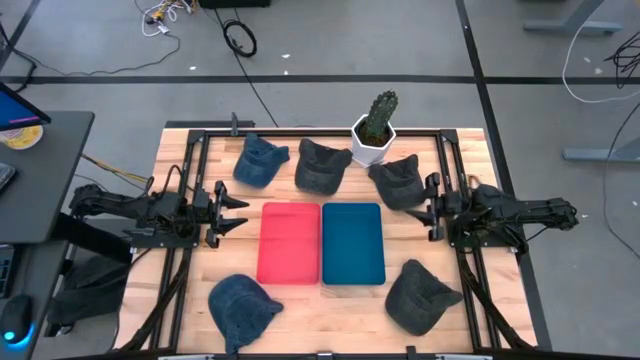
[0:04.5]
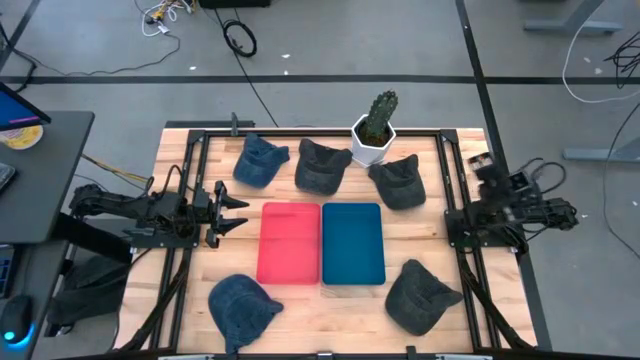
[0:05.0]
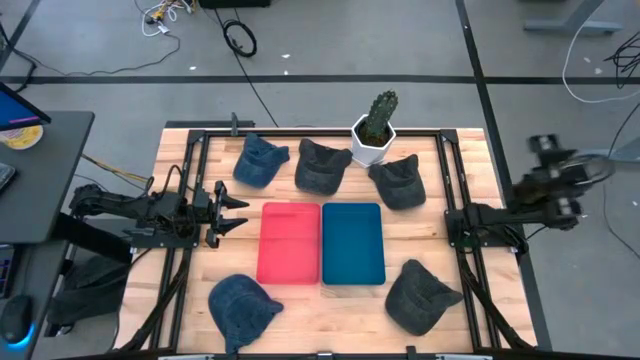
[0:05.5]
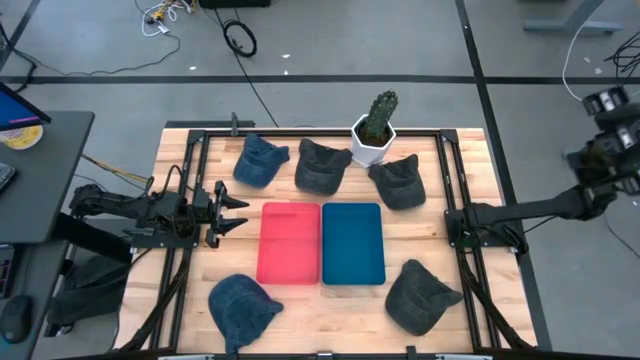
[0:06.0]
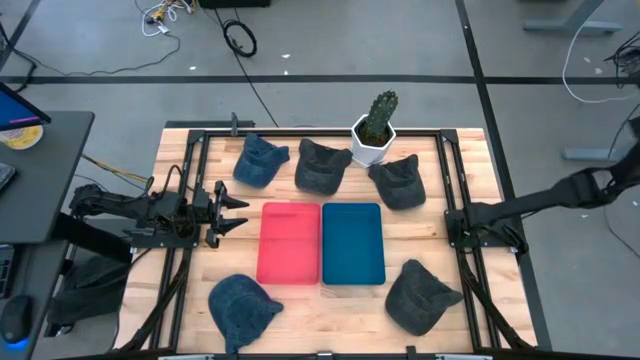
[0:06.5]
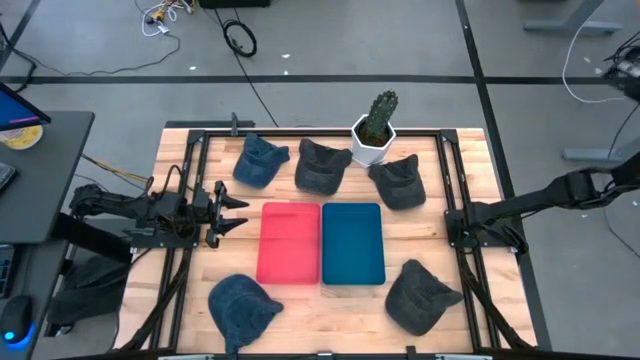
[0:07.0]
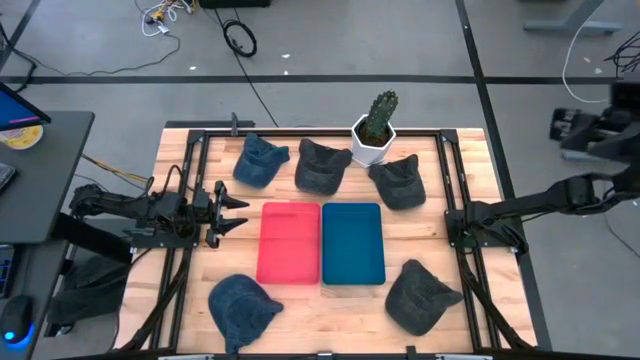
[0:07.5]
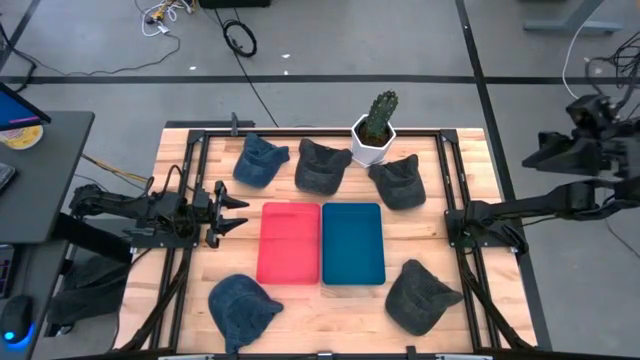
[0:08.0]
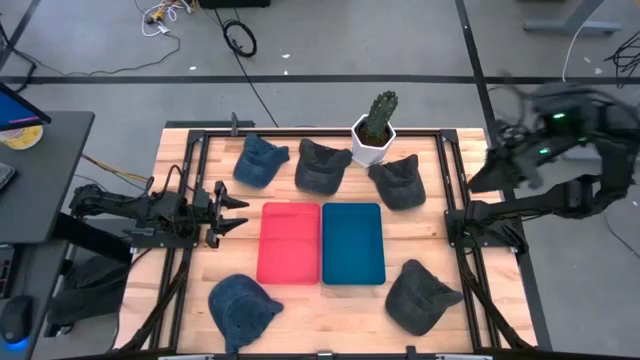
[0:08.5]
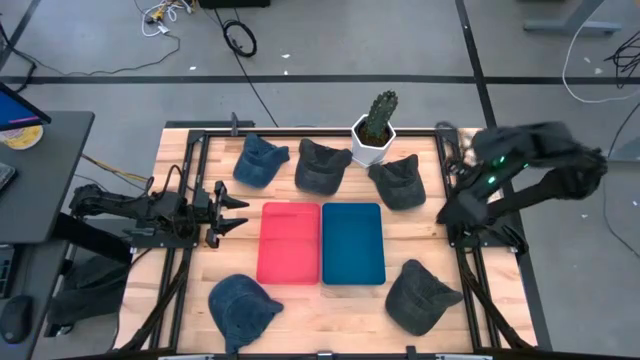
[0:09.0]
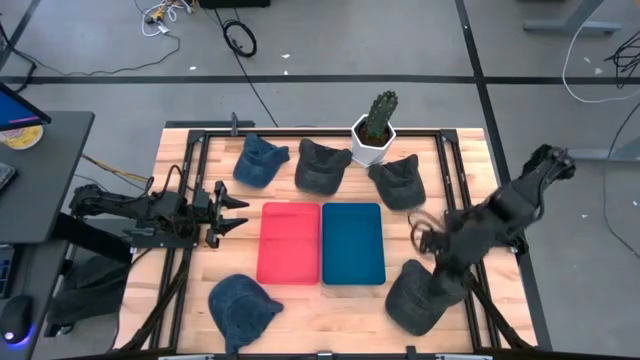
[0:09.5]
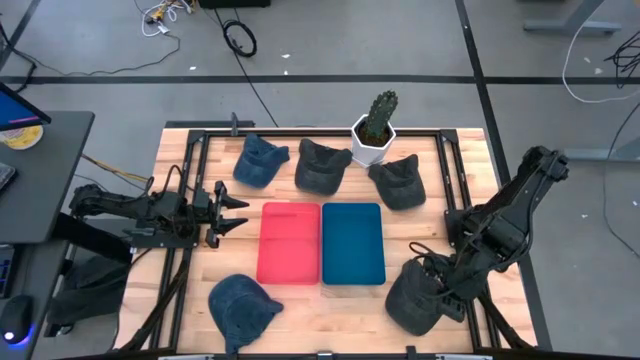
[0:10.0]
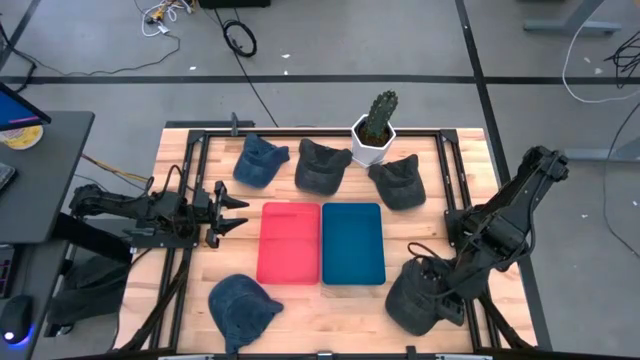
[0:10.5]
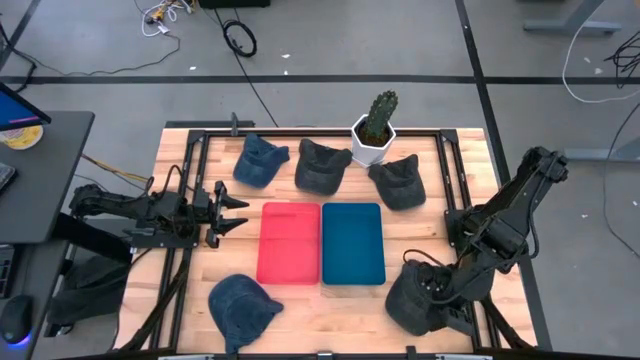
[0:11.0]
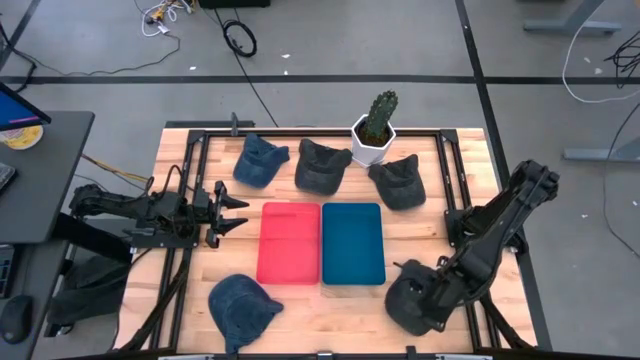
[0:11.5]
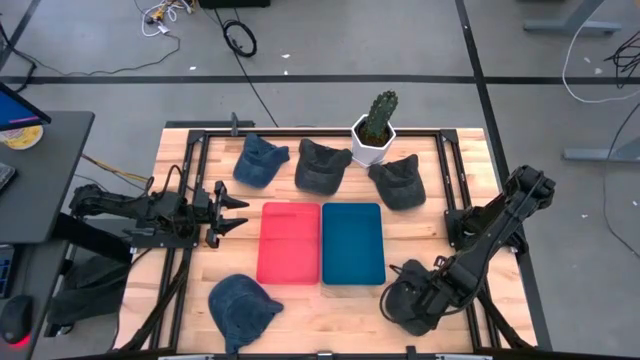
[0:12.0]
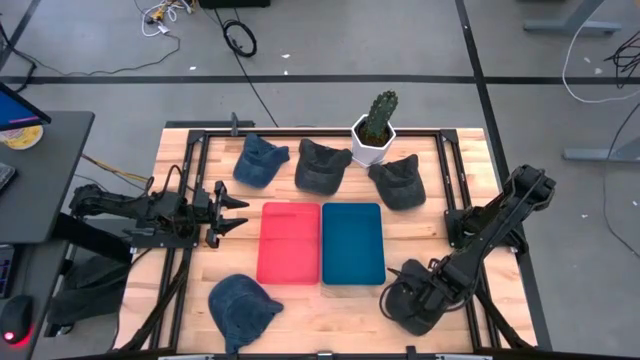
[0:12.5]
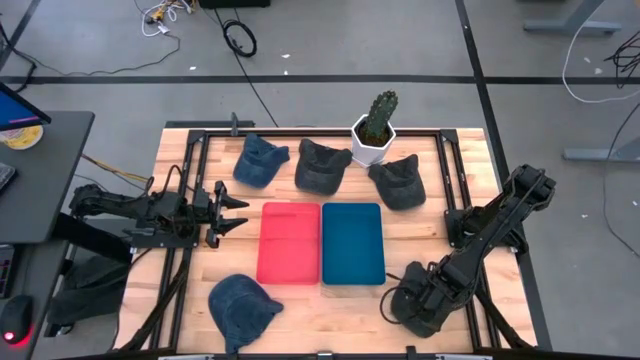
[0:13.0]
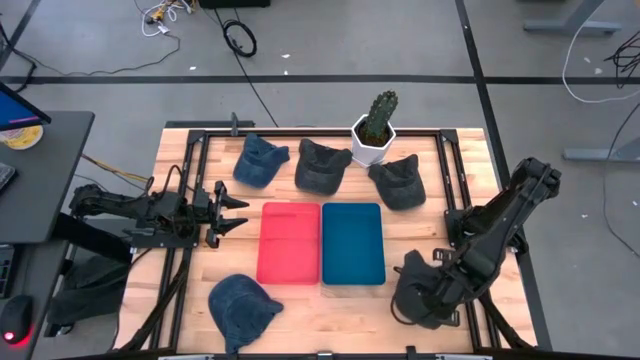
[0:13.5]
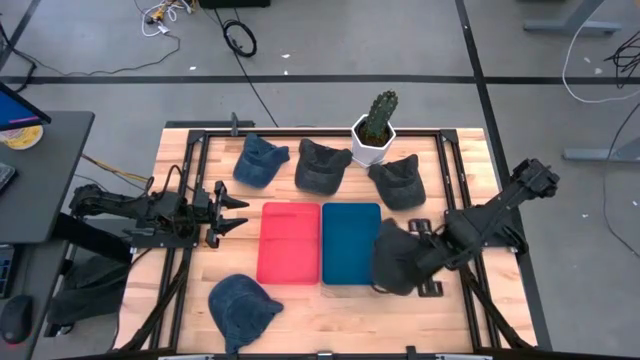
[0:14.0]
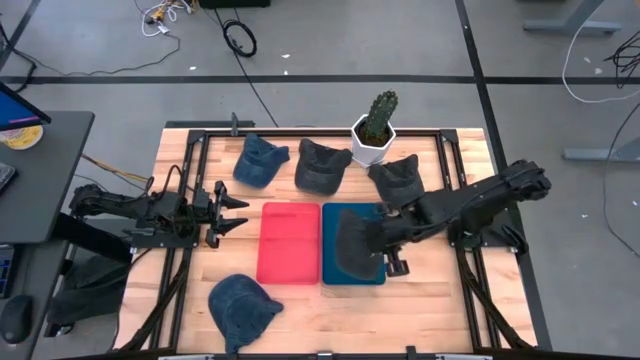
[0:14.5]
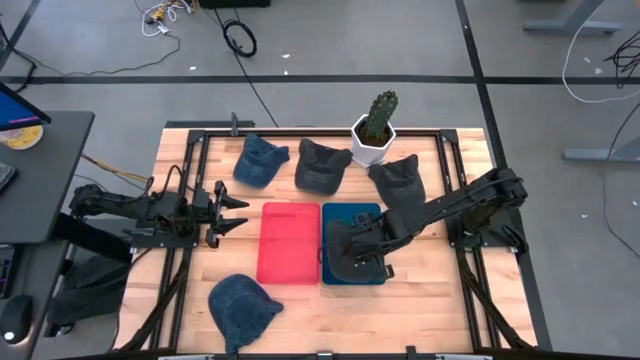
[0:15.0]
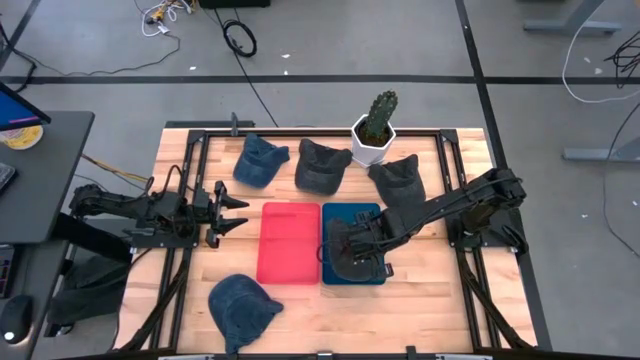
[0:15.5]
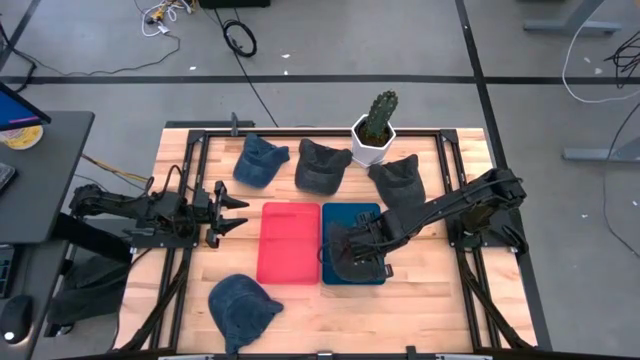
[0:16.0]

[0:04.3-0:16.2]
Task: Pick & Place hat
Put the bottom black cap into the blue bin

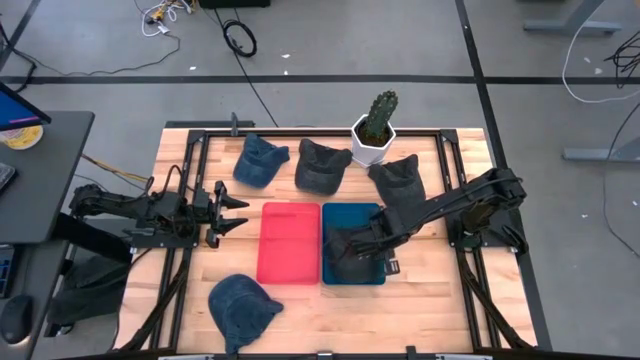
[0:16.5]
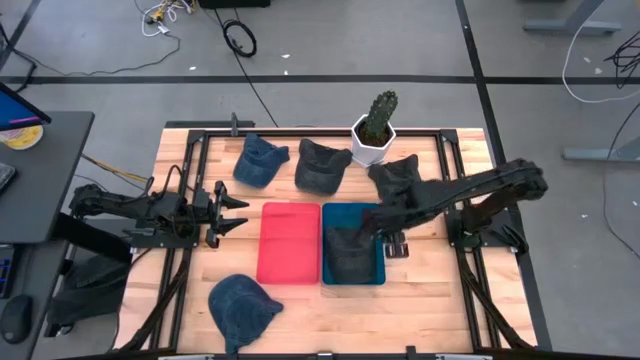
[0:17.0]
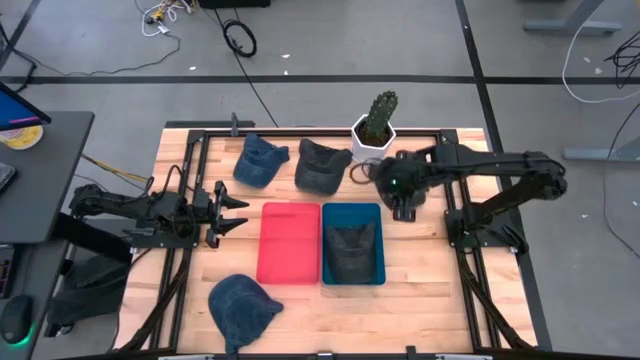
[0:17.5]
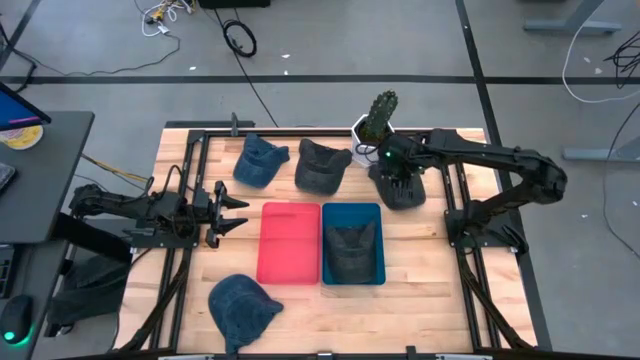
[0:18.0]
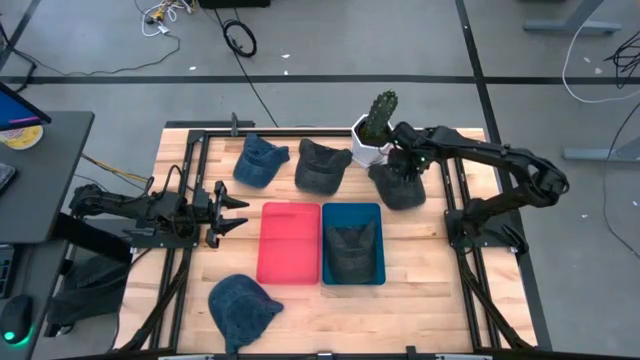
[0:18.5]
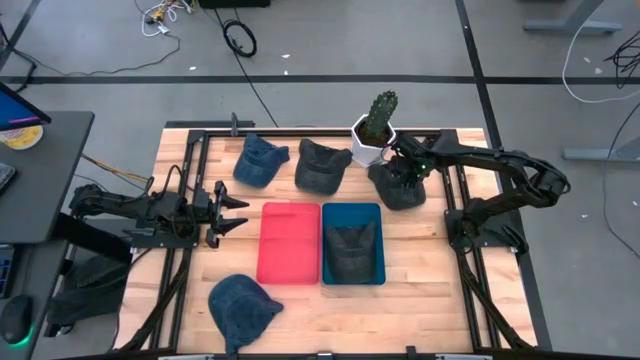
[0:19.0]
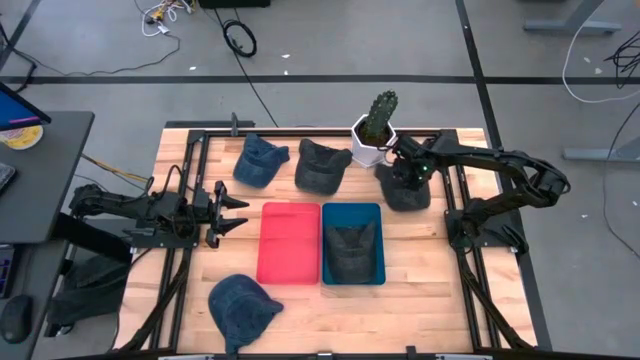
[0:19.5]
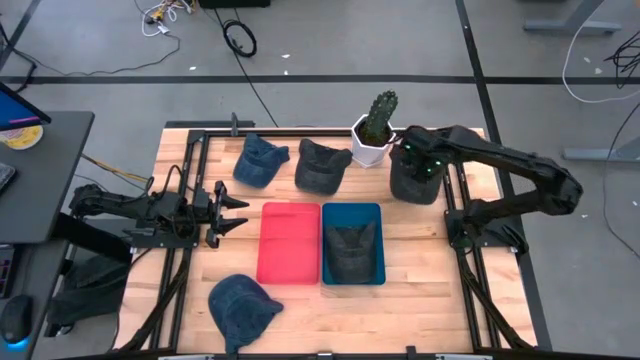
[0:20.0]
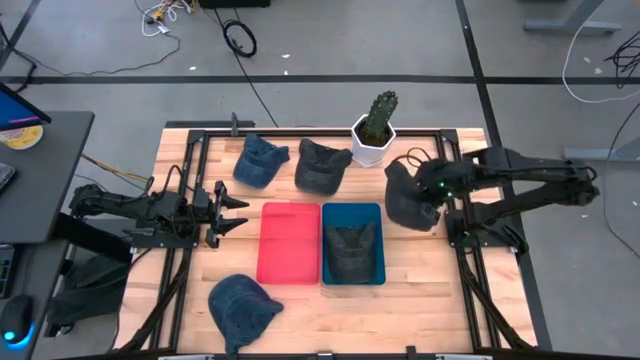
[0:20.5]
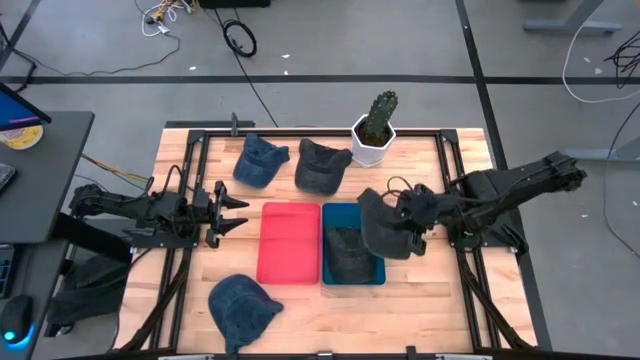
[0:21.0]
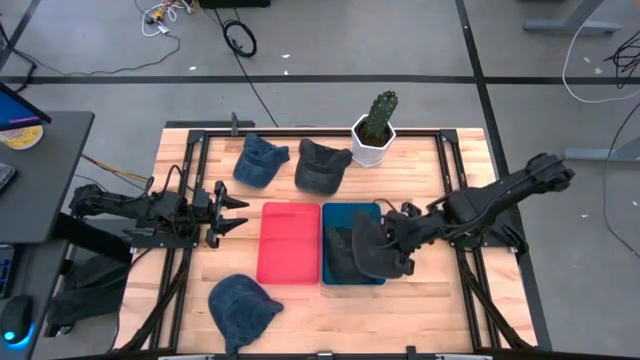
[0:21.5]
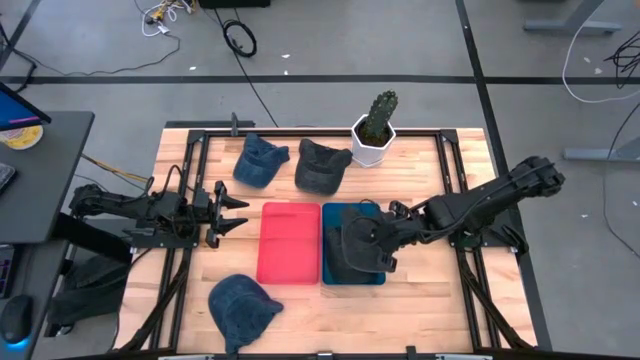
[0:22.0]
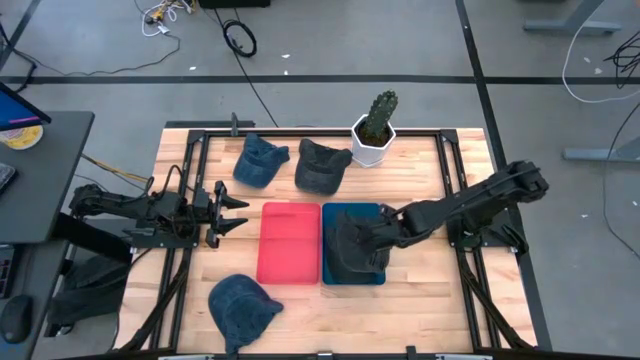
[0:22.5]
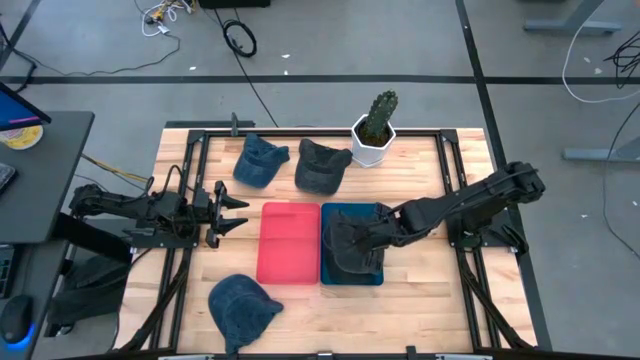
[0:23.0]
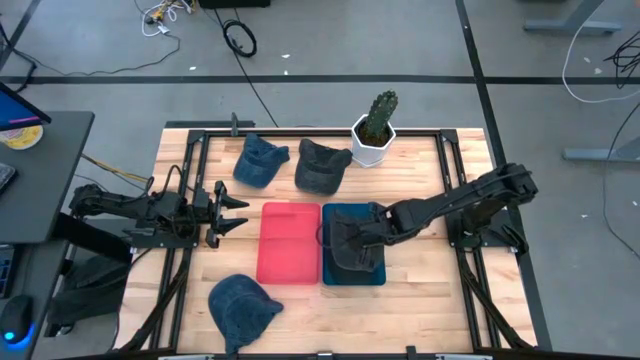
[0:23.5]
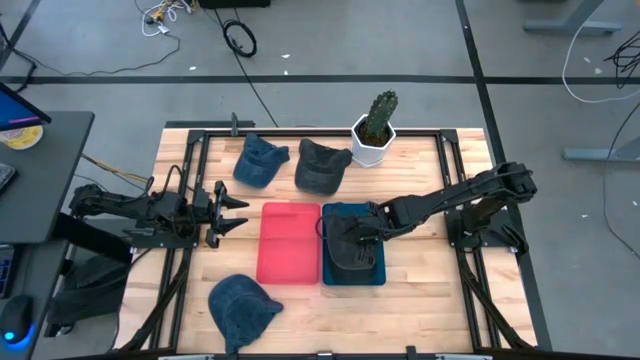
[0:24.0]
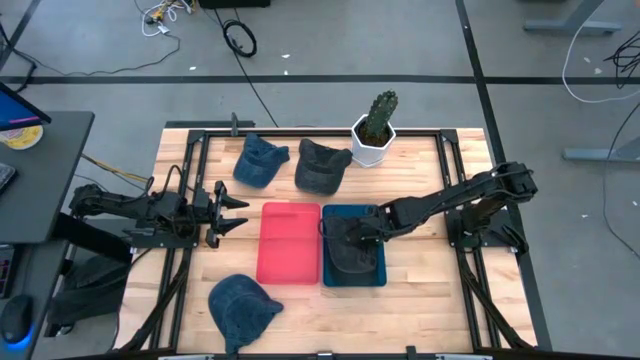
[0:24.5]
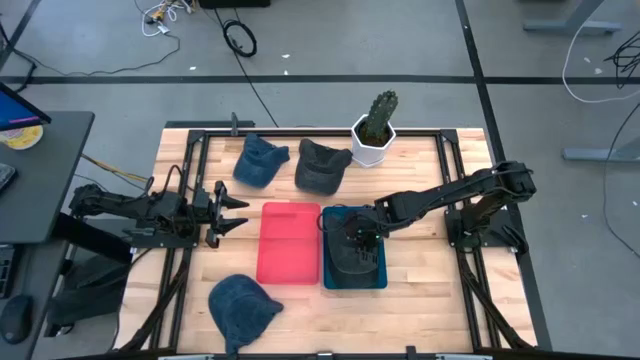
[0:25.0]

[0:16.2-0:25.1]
Put the right black cap into the blue bin
